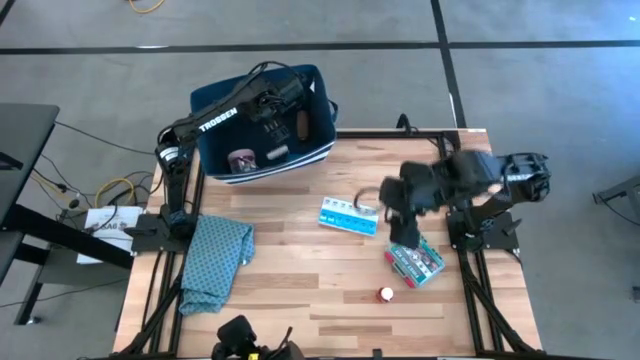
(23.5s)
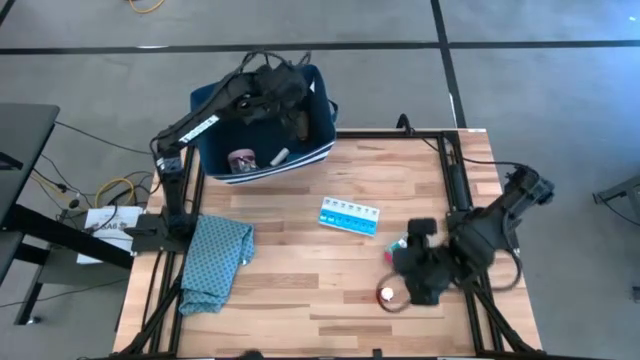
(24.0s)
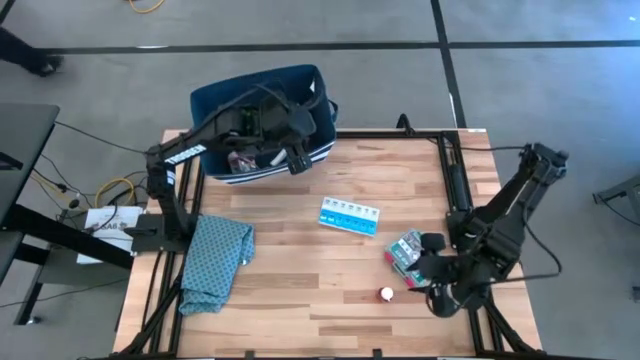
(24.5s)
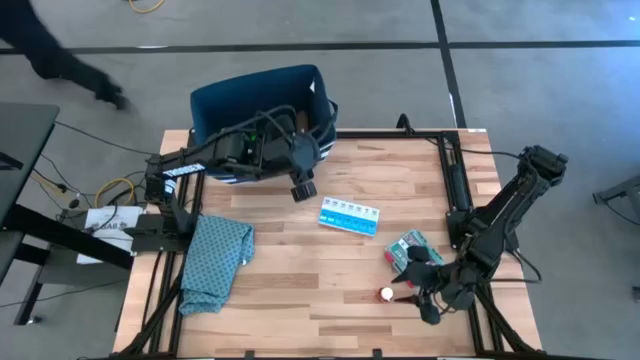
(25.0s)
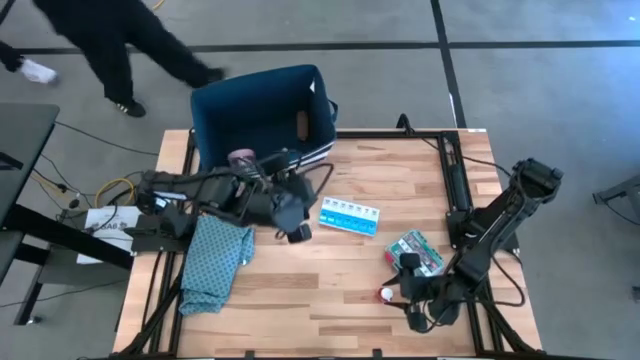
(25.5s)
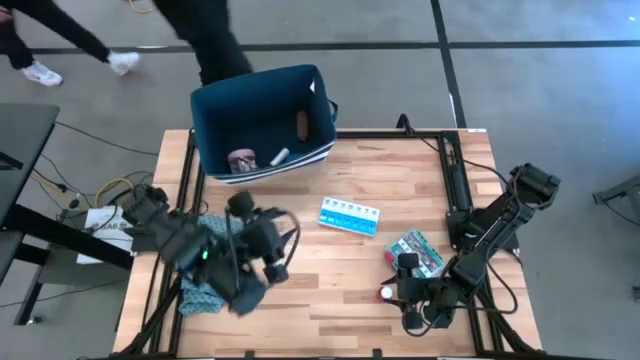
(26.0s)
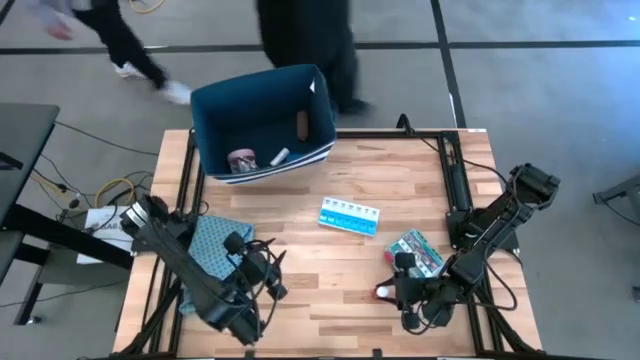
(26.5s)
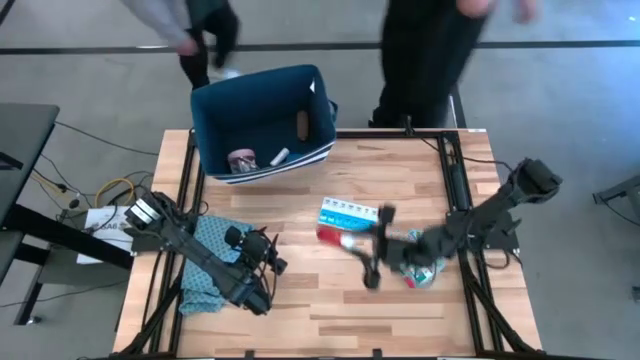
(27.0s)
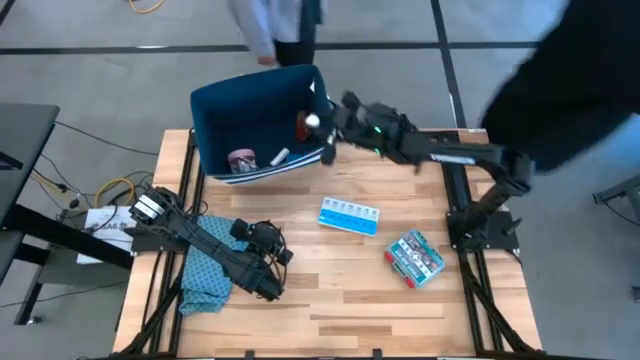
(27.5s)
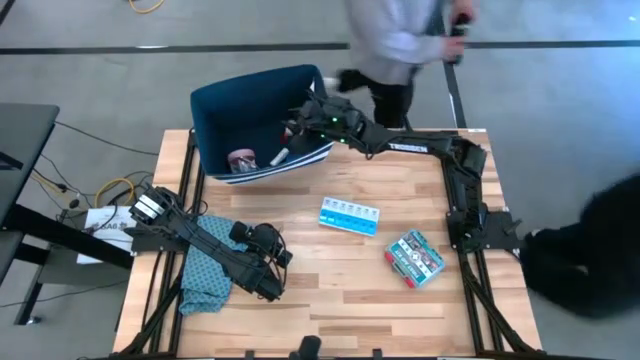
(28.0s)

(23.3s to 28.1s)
Task: Pick & place medical supplies in basket/bin
Put the red pill bottle into the blue bin

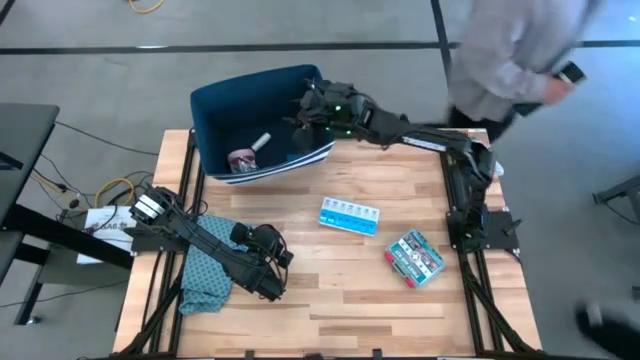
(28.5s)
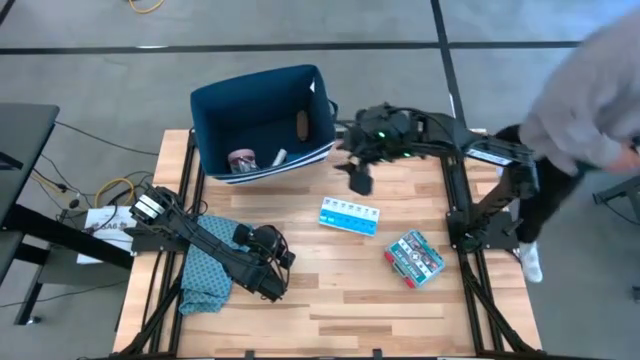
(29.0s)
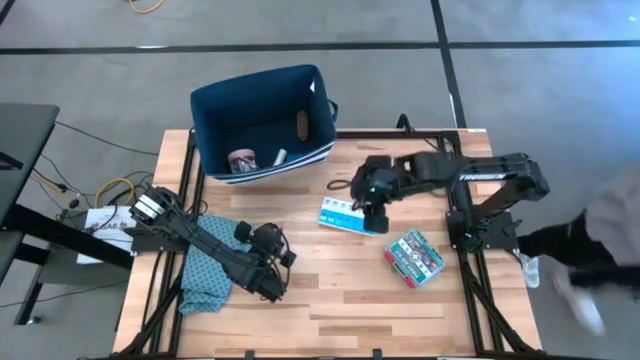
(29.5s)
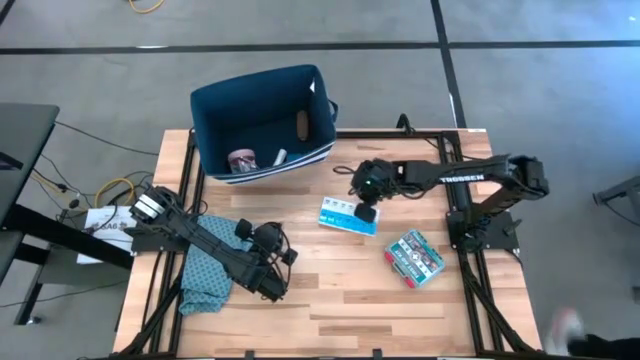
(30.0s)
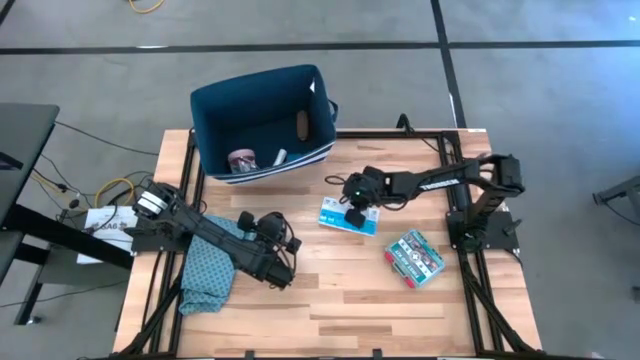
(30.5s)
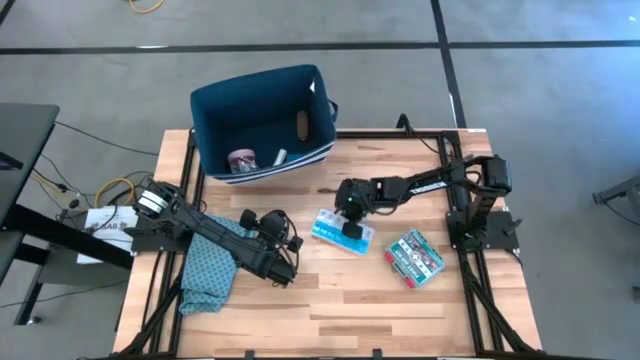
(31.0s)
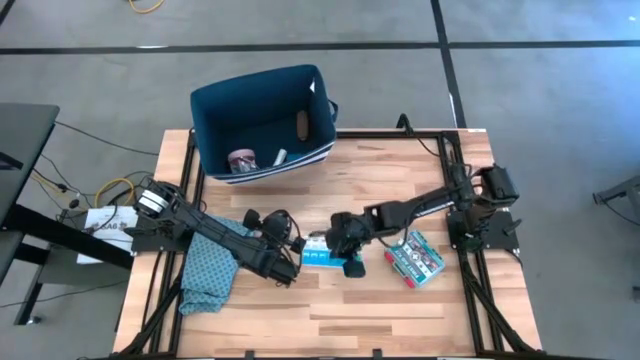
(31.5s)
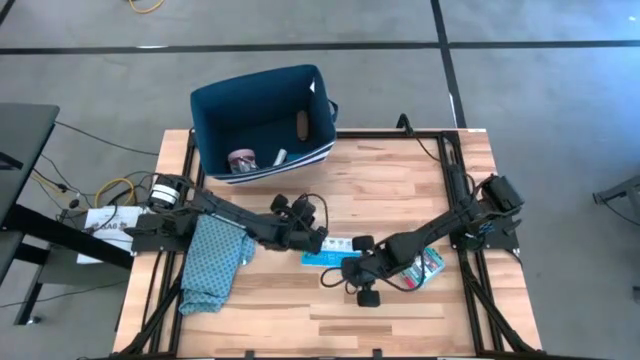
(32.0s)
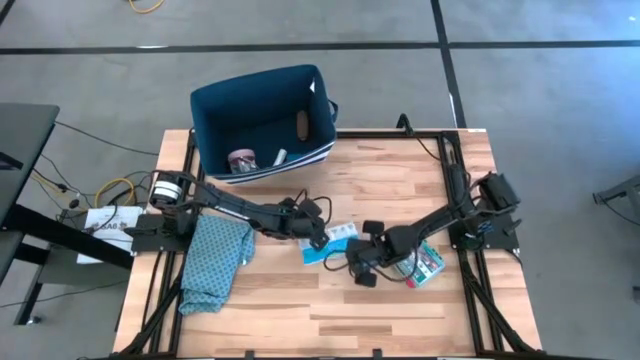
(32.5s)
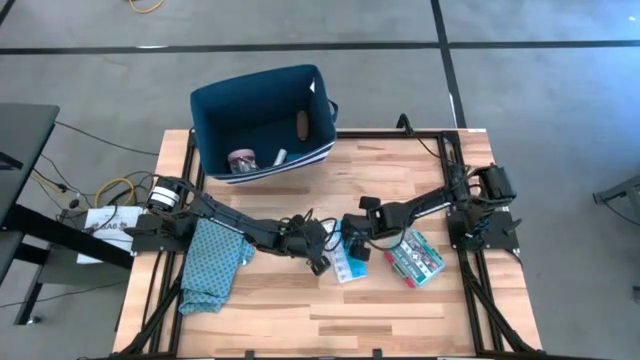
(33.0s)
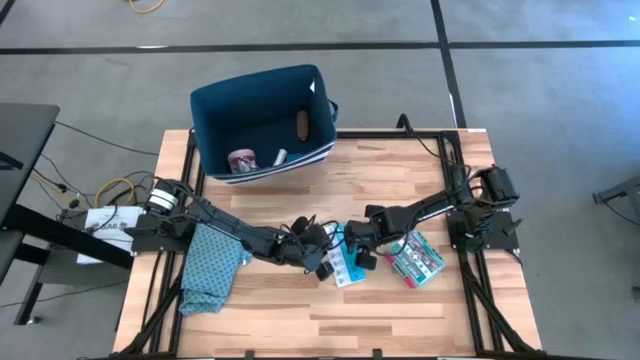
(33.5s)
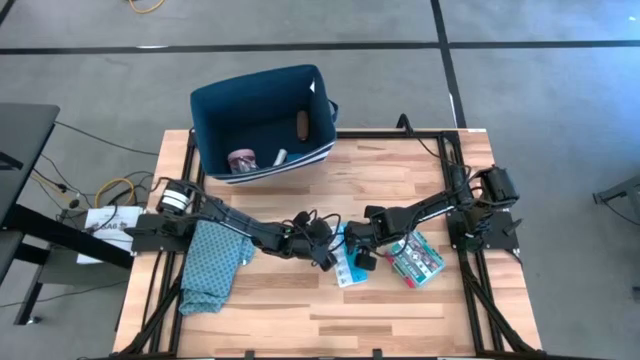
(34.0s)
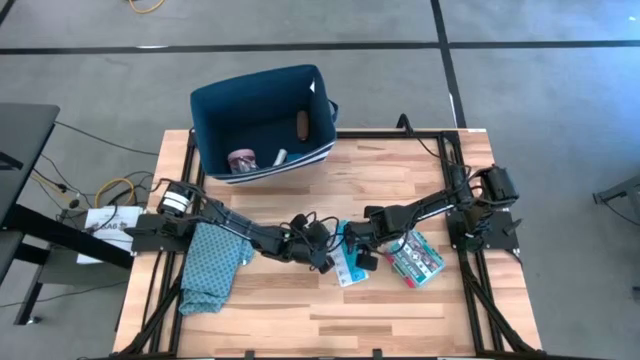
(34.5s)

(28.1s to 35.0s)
Put the blue and white medicine organizer into the blue bin

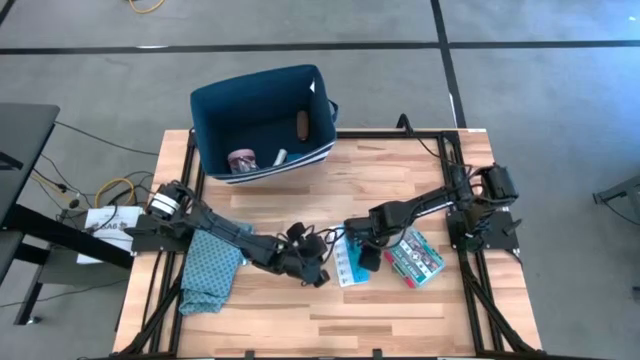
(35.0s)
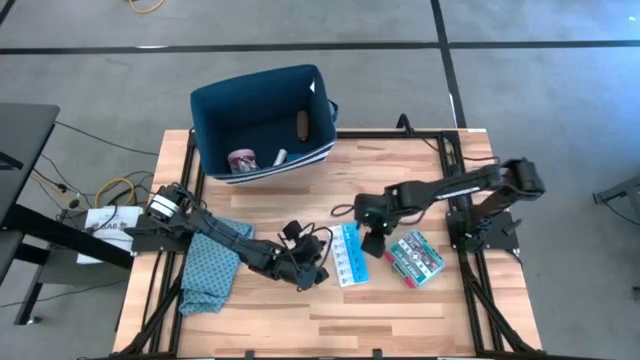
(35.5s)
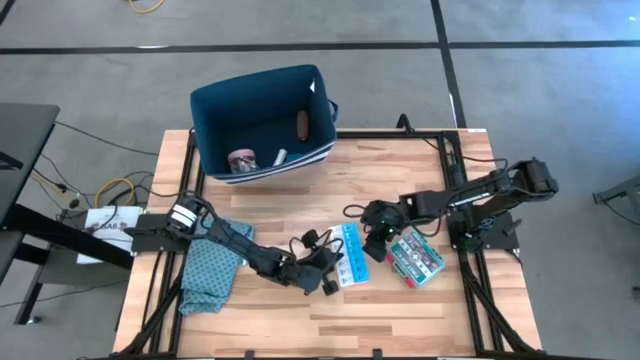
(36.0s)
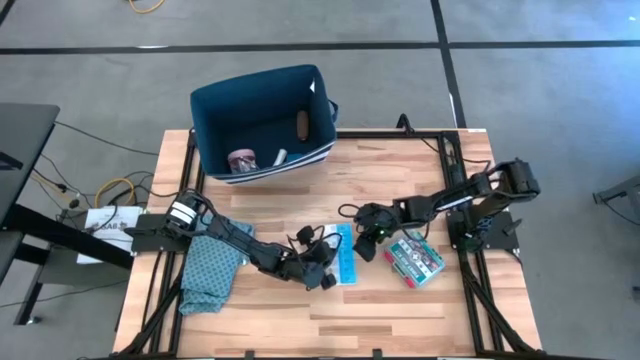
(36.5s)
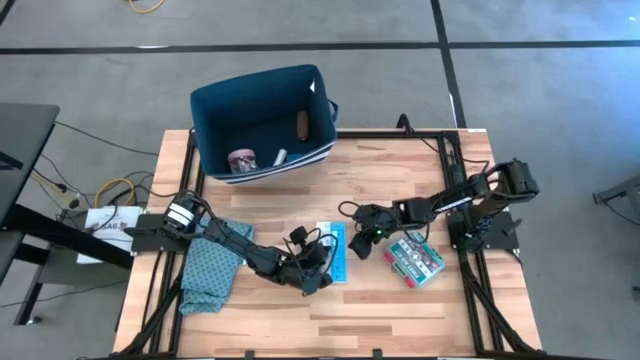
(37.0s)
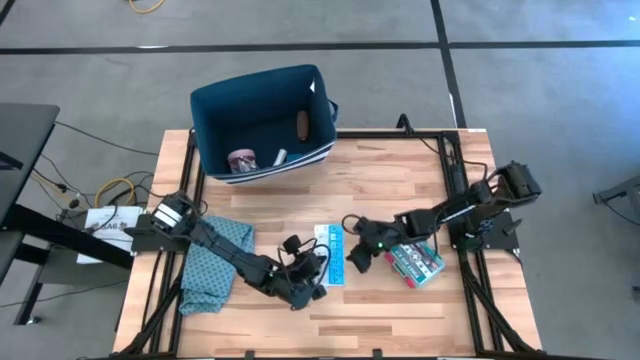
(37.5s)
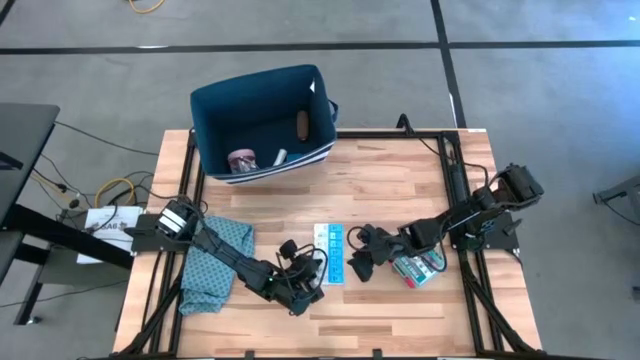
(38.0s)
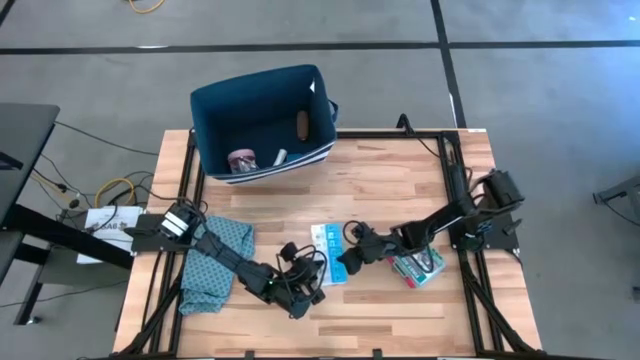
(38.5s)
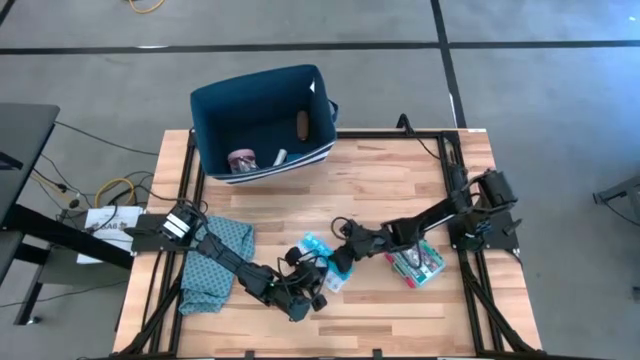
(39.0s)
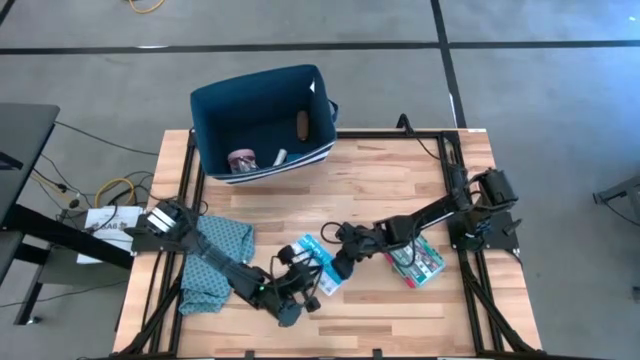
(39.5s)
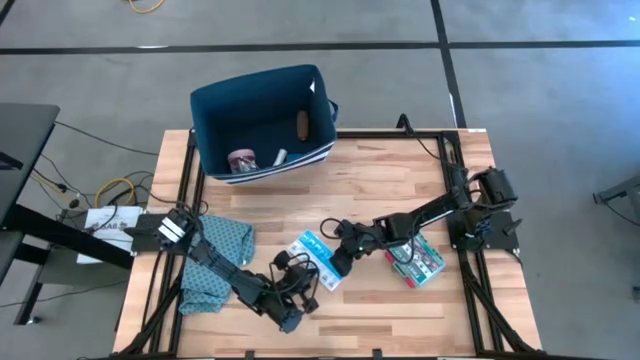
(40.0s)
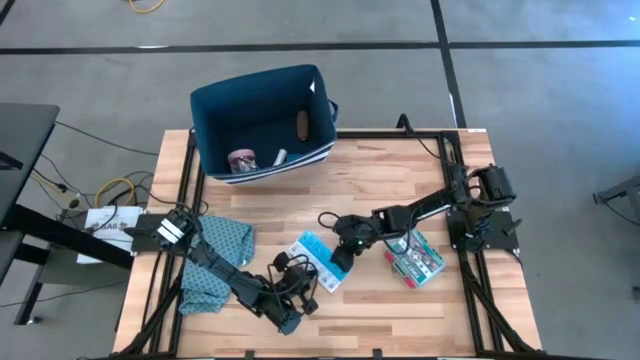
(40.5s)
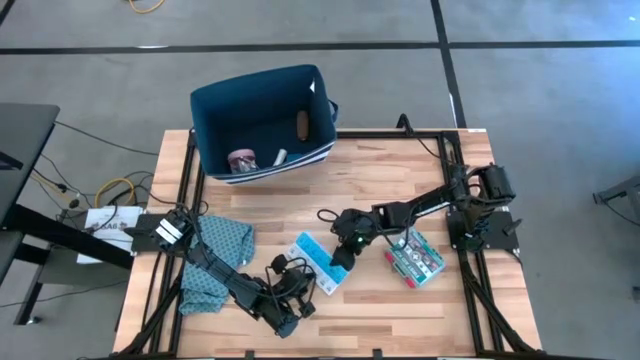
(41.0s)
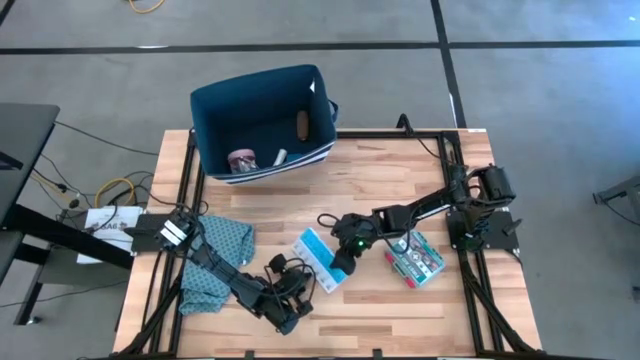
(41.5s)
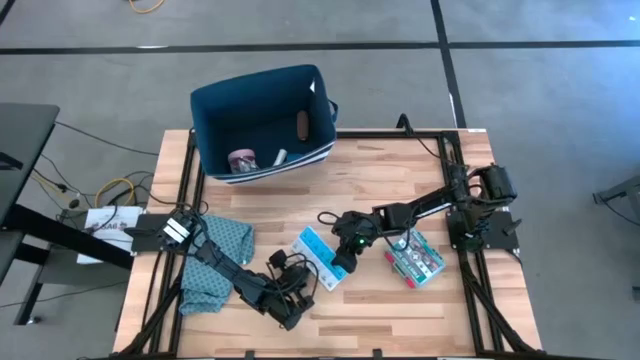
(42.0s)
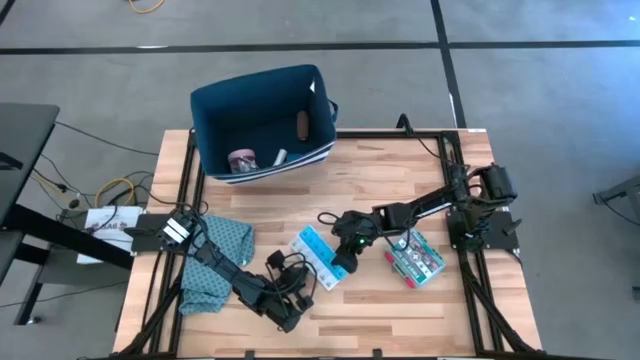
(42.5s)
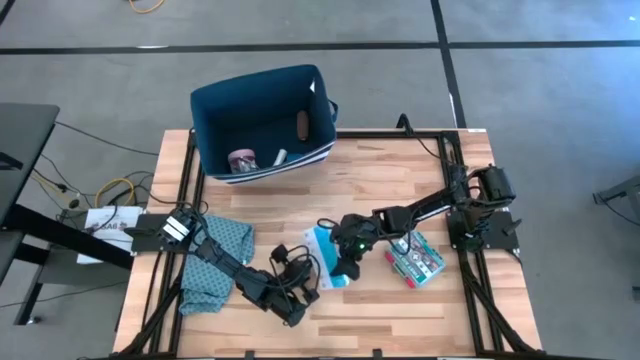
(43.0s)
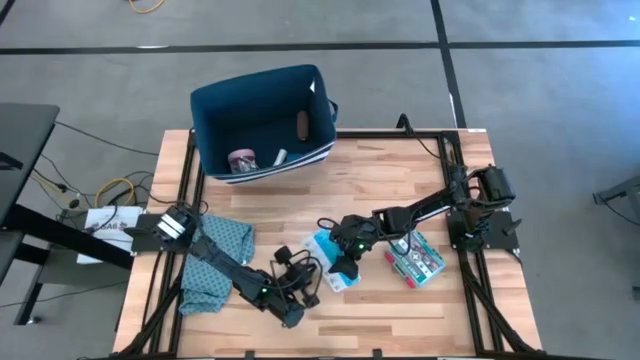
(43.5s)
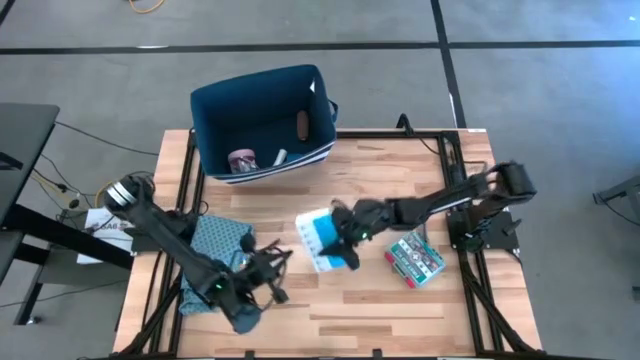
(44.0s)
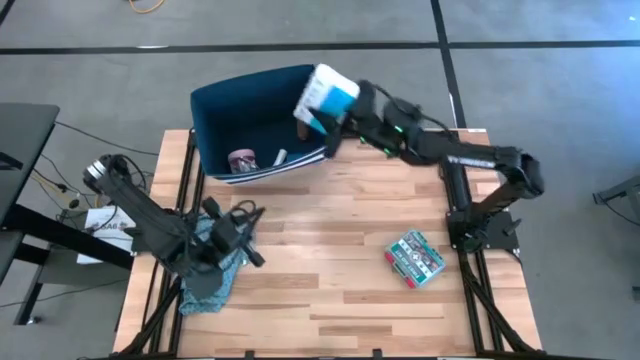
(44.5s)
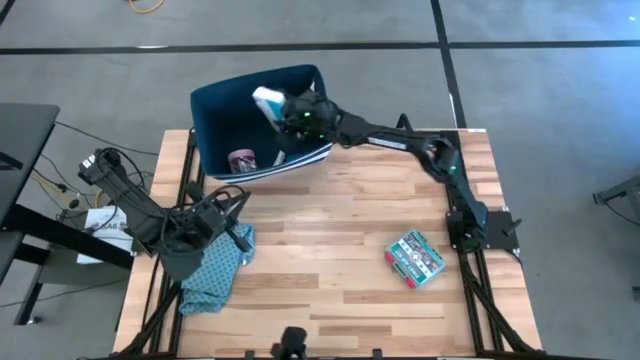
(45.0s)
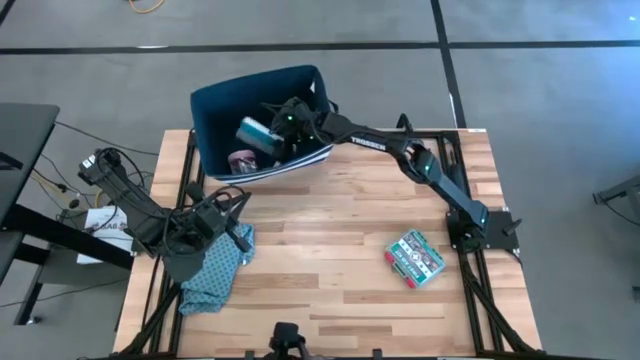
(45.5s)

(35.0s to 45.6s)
Put the blue and white medicine organizer into the blue bin
